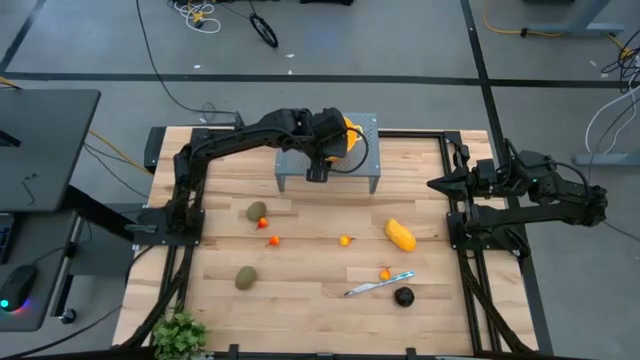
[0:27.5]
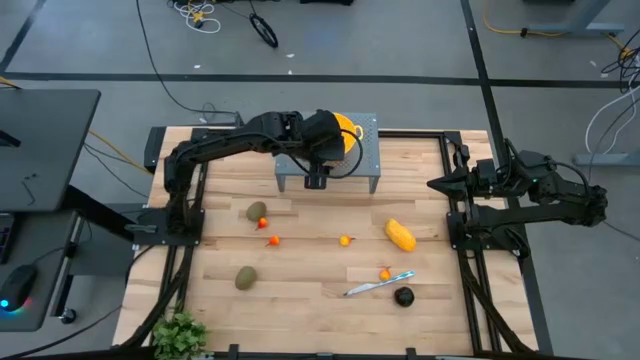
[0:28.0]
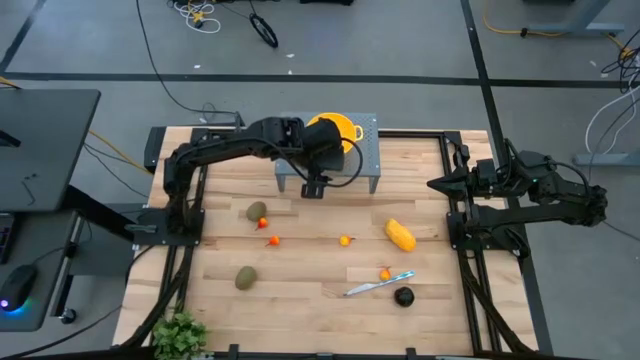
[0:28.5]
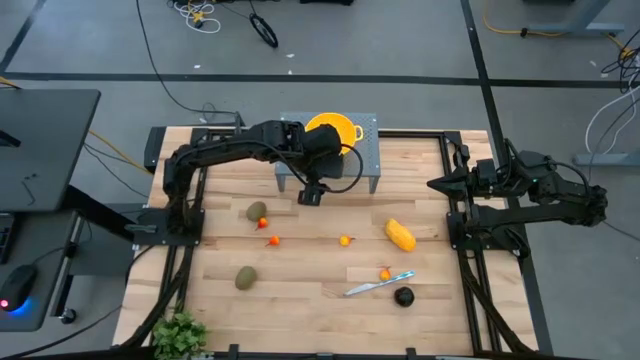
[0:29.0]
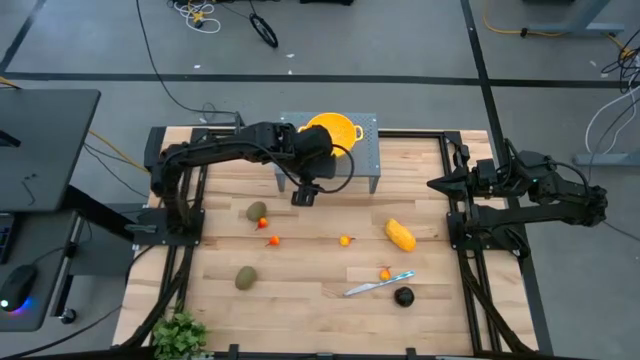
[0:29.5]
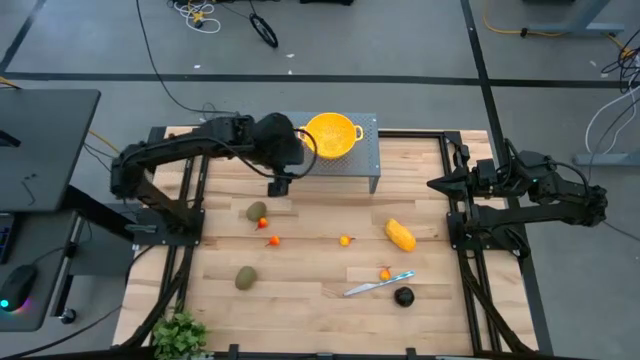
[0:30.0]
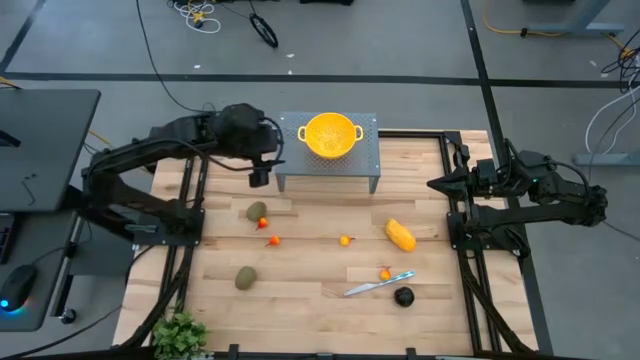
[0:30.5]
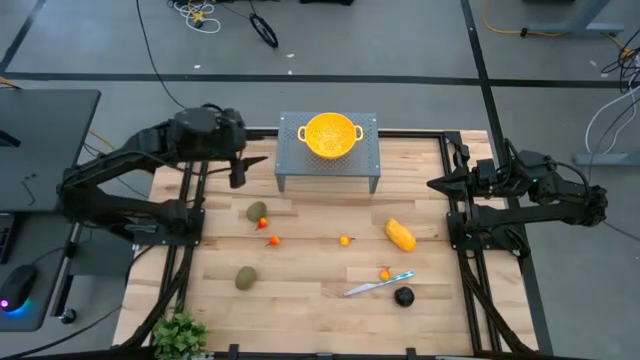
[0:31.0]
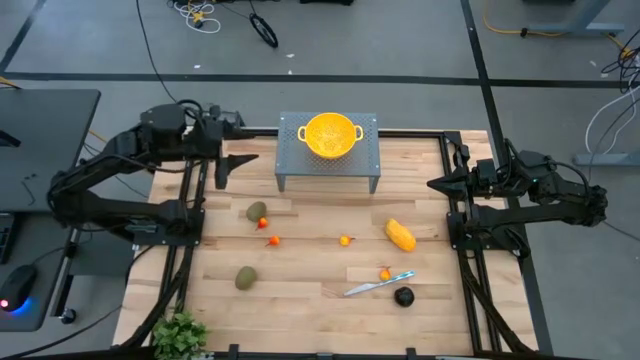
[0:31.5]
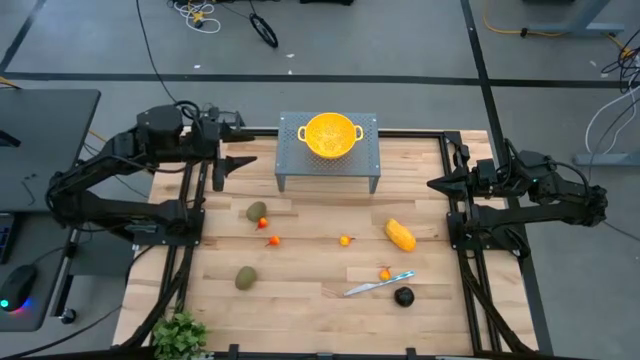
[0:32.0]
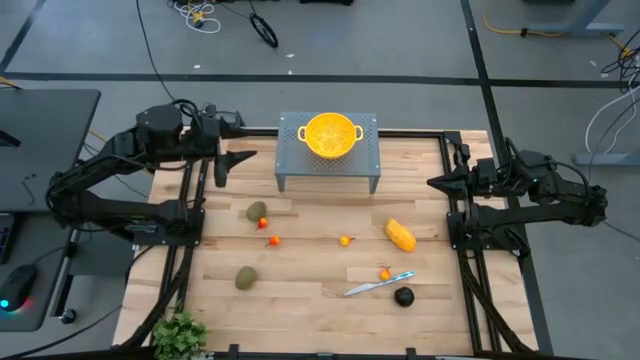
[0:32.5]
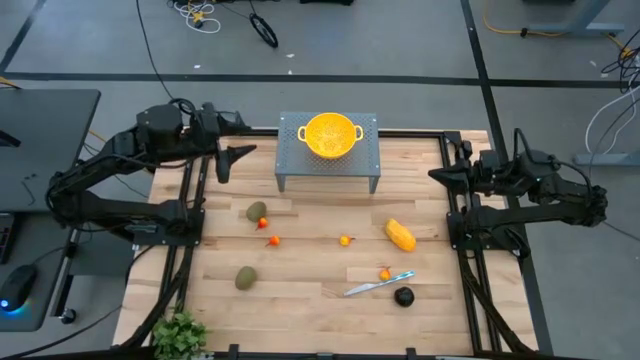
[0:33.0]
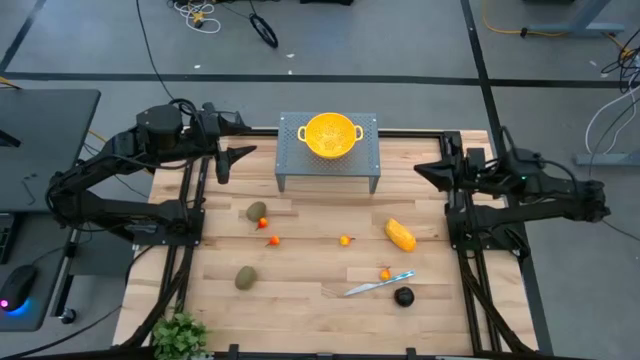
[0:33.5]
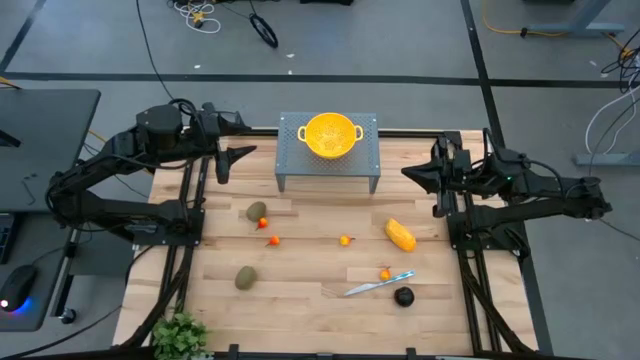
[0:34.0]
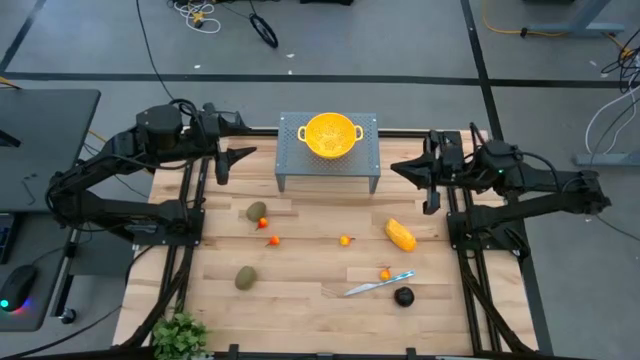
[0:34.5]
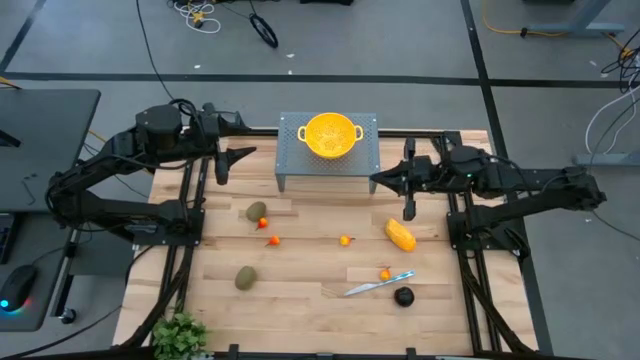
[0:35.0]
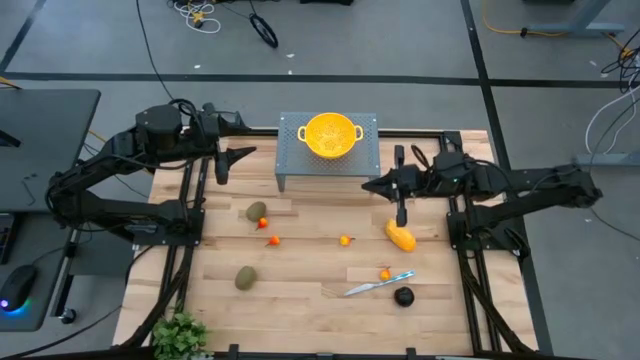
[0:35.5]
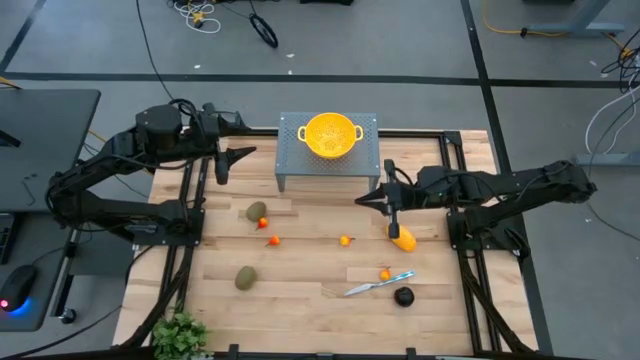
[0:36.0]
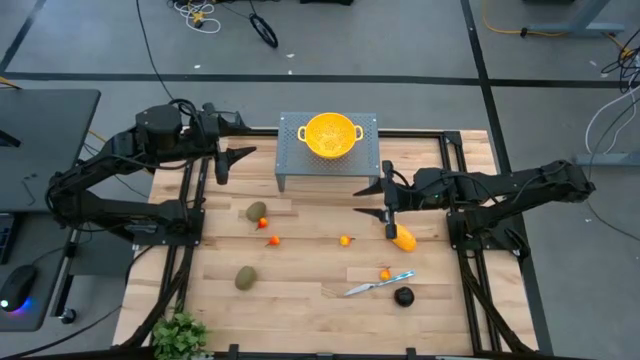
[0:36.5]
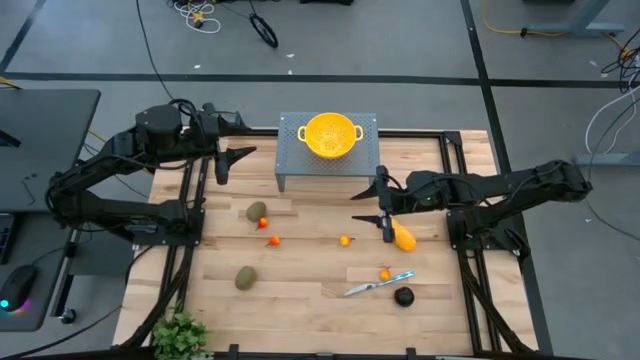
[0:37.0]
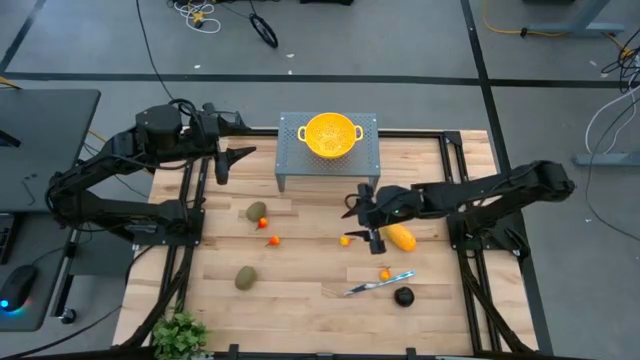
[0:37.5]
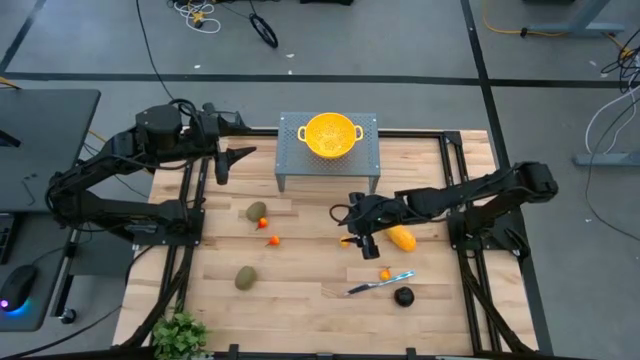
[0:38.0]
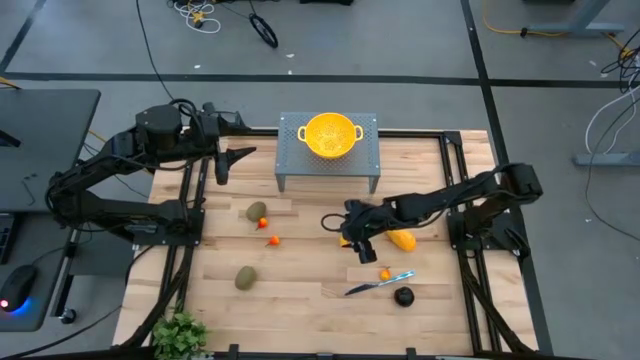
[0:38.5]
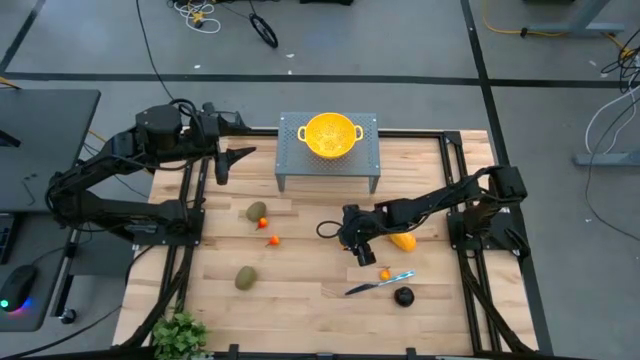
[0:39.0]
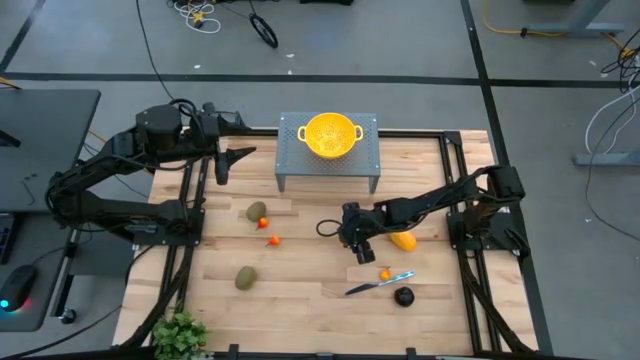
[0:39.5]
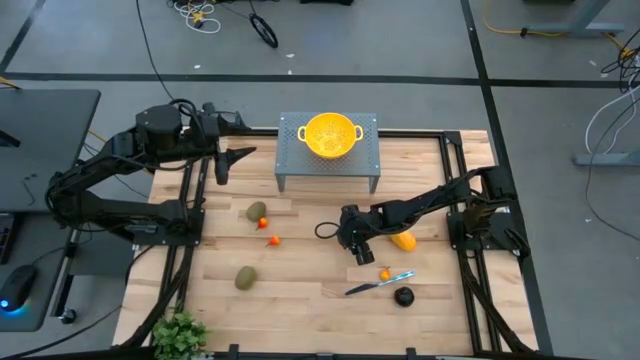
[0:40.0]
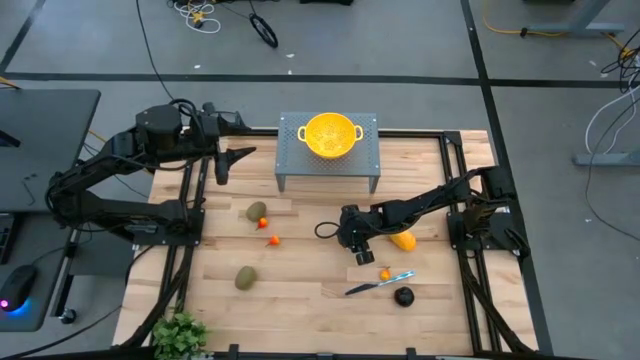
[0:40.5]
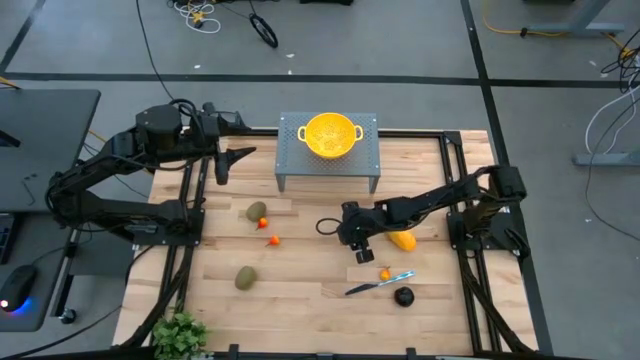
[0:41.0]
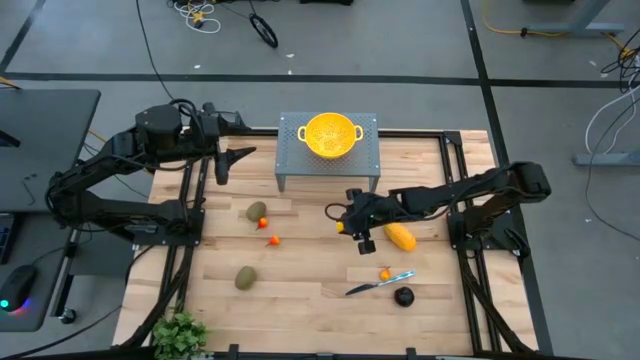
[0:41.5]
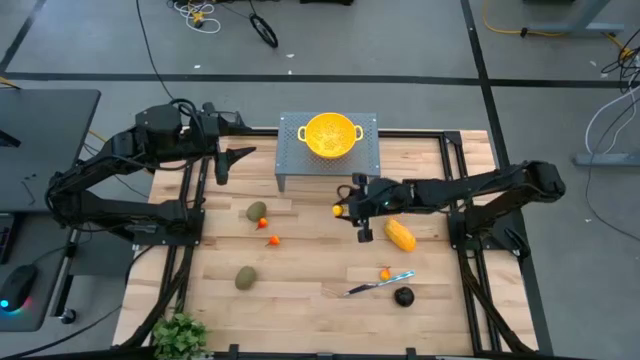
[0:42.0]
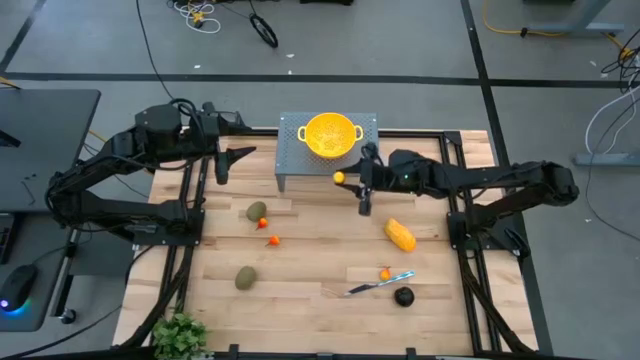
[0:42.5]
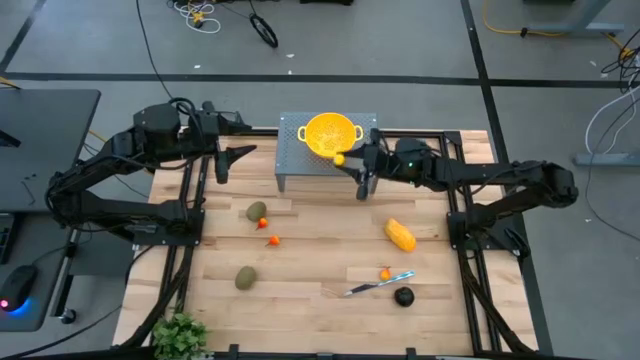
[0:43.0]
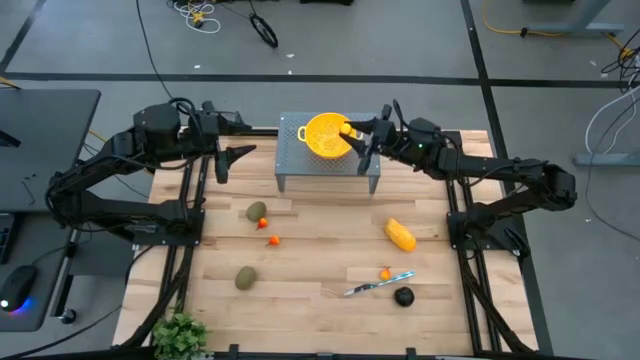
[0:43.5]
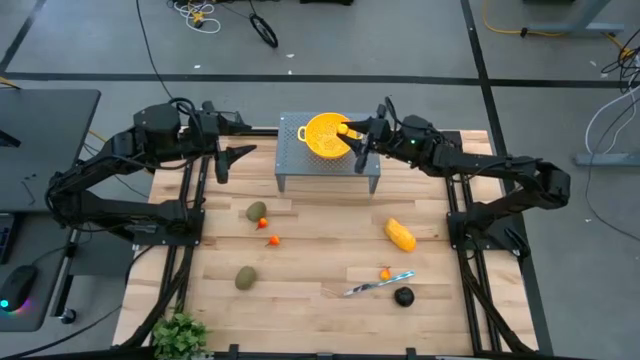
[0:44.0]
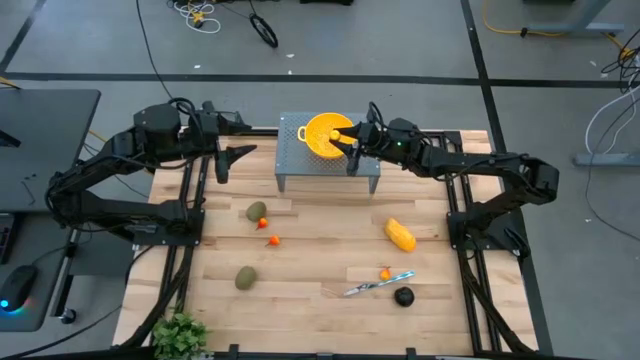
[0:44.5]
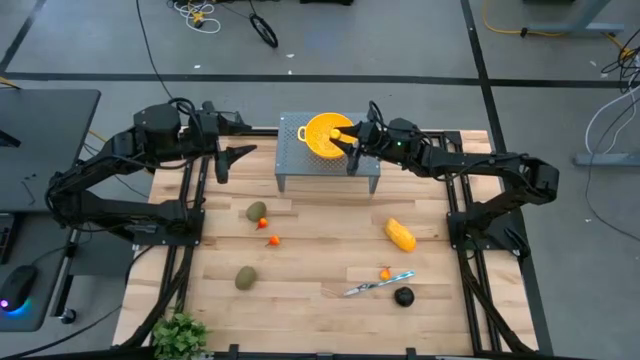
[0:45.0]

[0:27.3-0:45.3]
Task: Pick & Place Fruit
Put the yellow pear into the yellow strainer bowl on the shelf

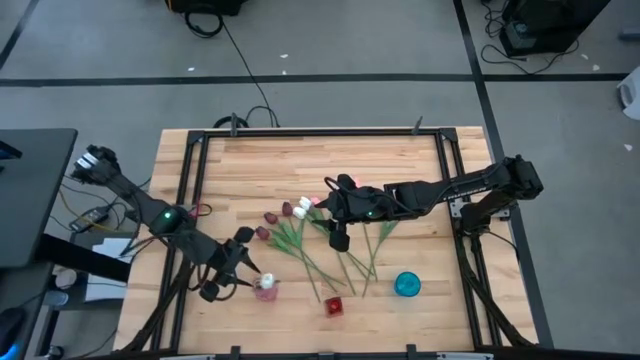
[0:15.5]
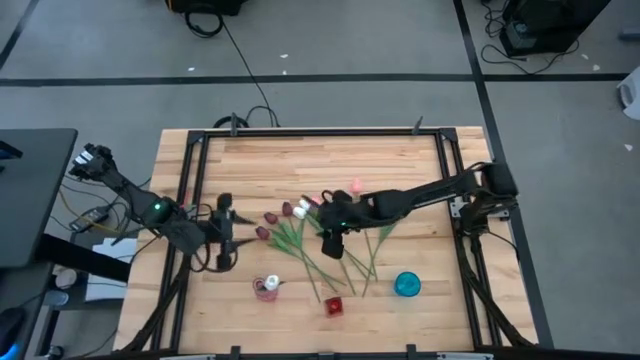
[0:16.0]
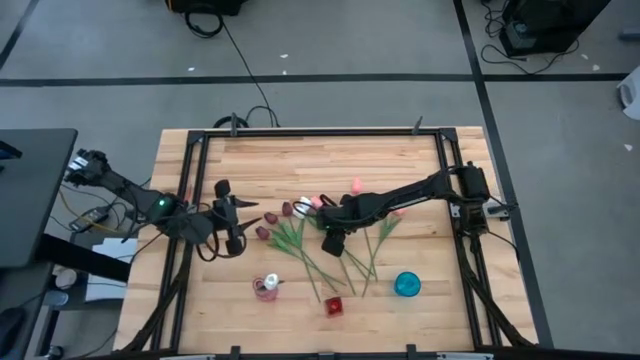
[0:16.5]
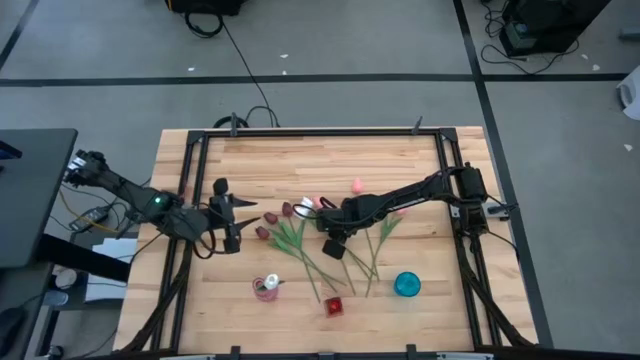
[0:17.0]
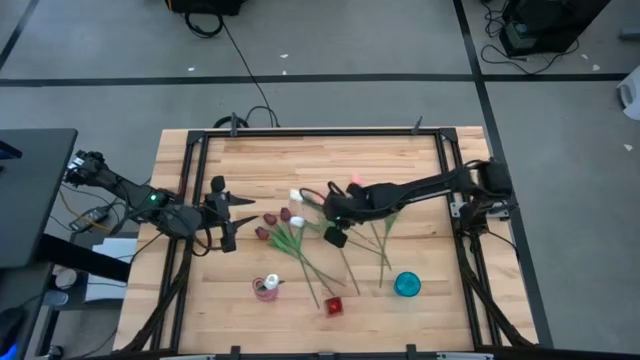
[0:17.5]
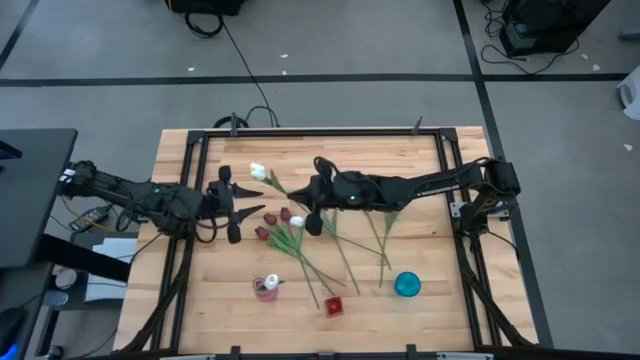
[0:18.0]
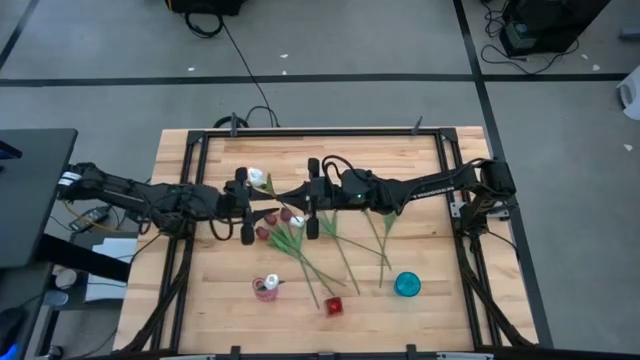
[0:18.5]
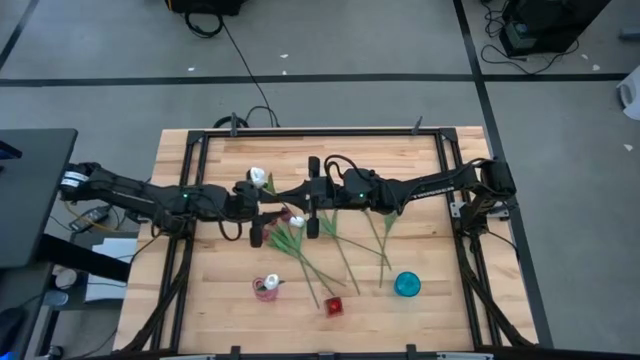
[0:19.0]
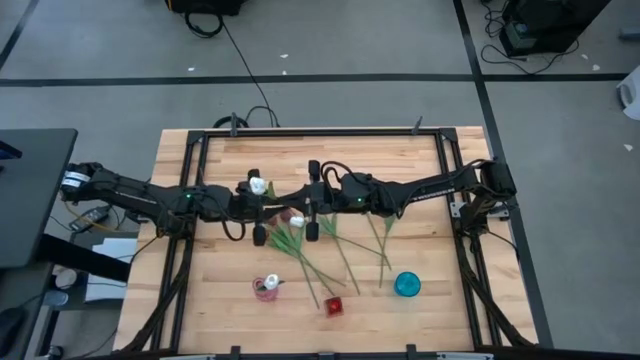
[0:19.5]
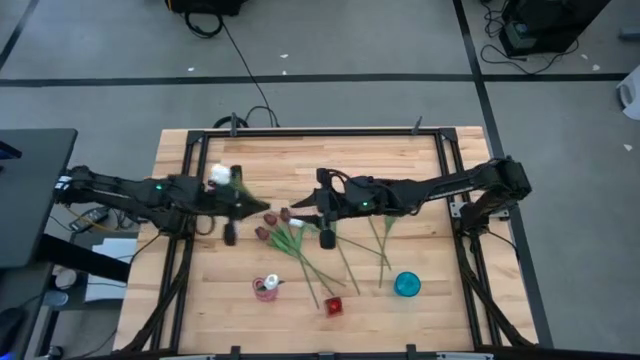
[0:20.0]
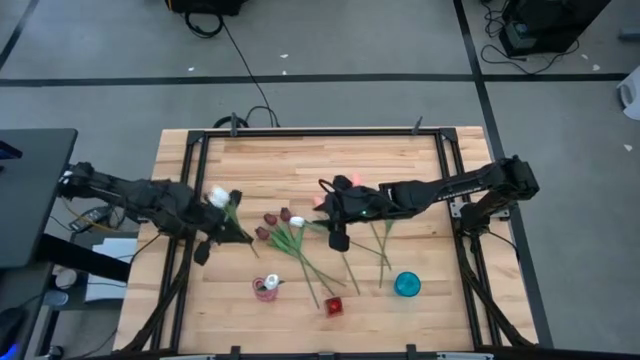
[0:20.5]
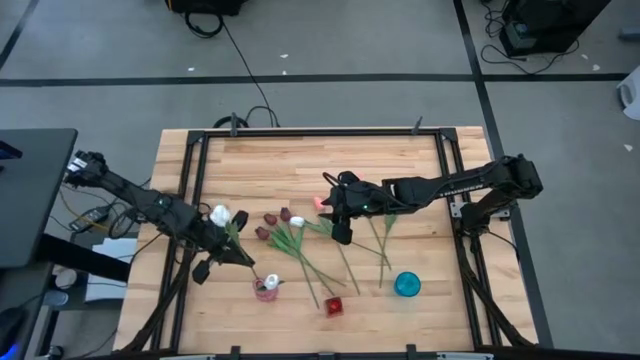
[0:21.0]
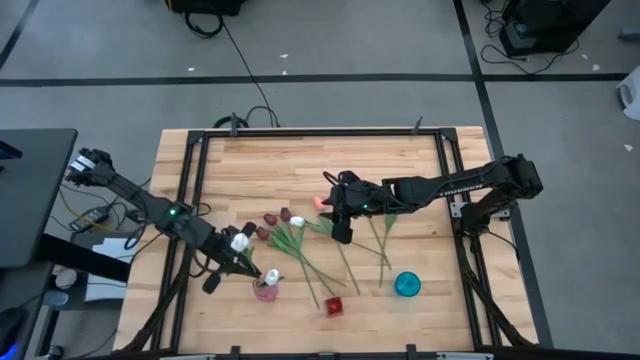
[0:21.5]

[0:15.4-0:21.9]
Task: Sort flowers into vase by color
Put the right white flower into the pink vase
